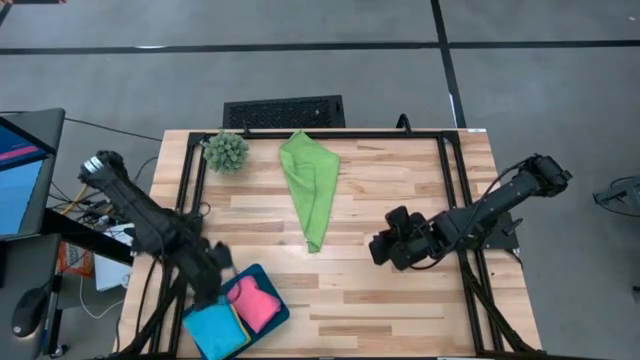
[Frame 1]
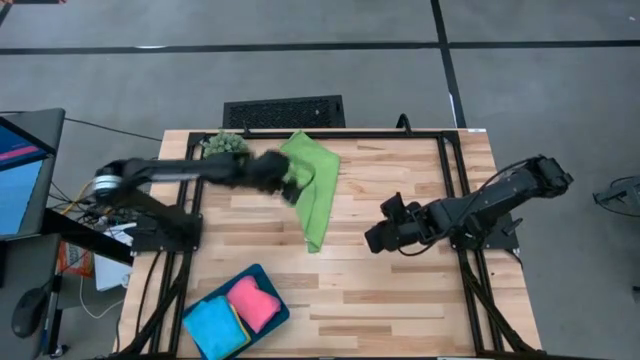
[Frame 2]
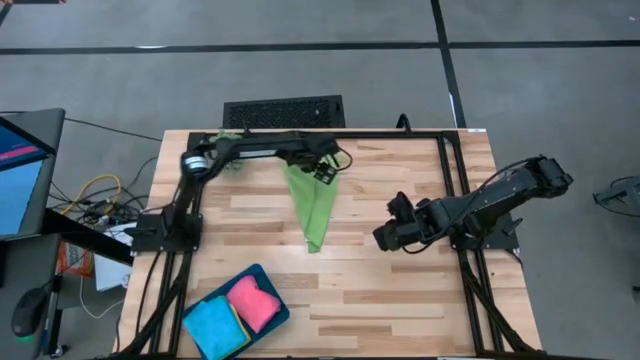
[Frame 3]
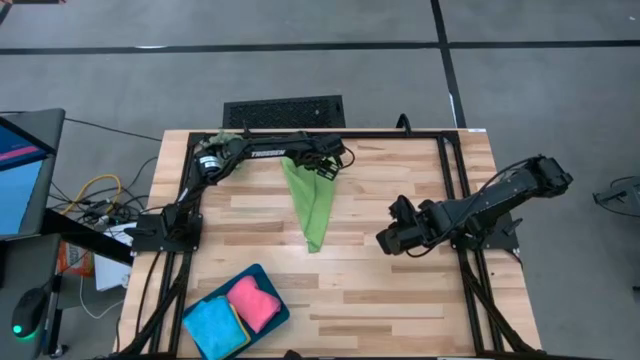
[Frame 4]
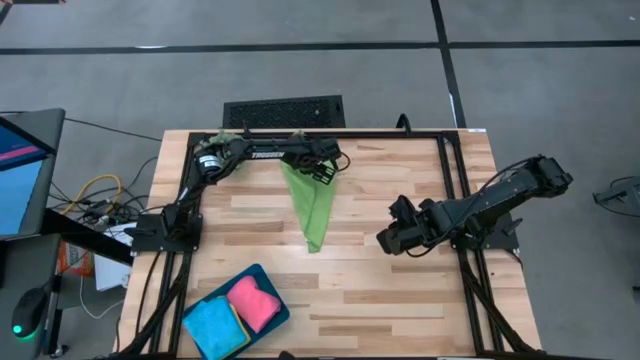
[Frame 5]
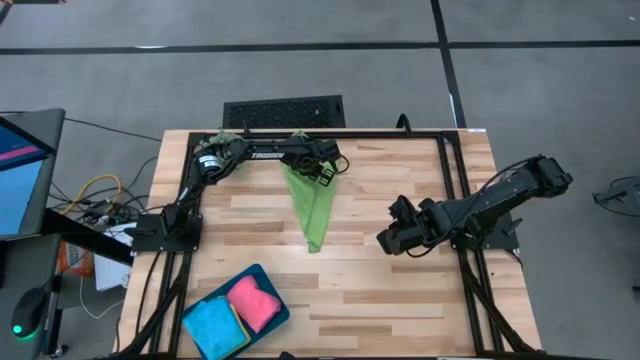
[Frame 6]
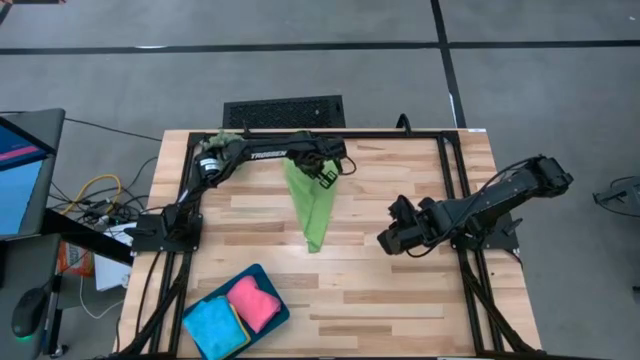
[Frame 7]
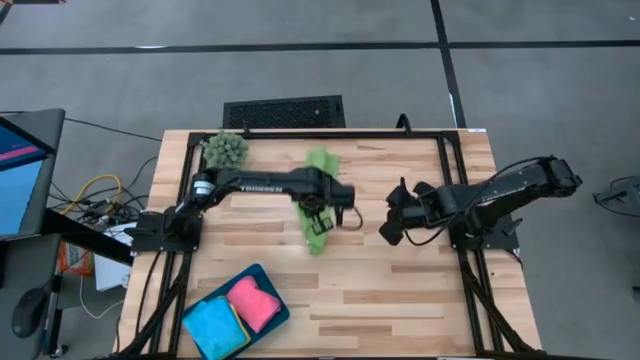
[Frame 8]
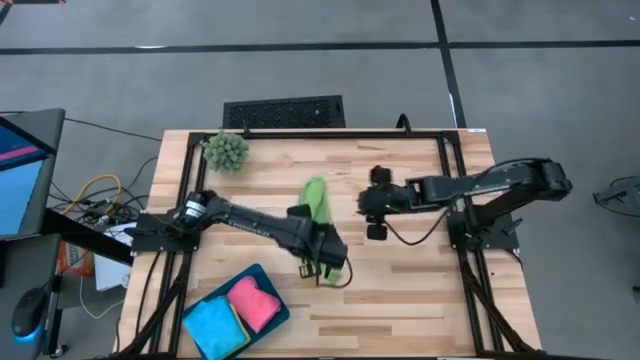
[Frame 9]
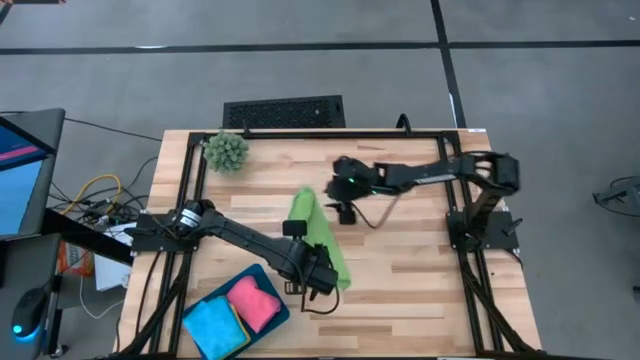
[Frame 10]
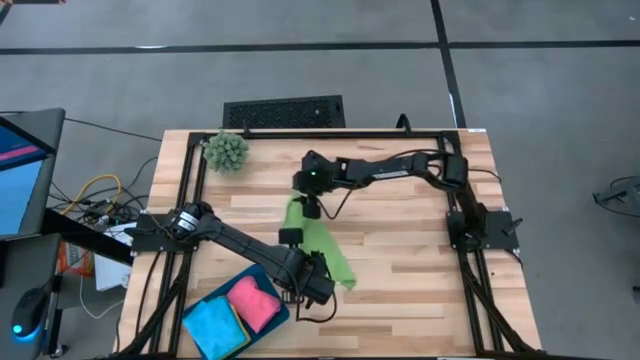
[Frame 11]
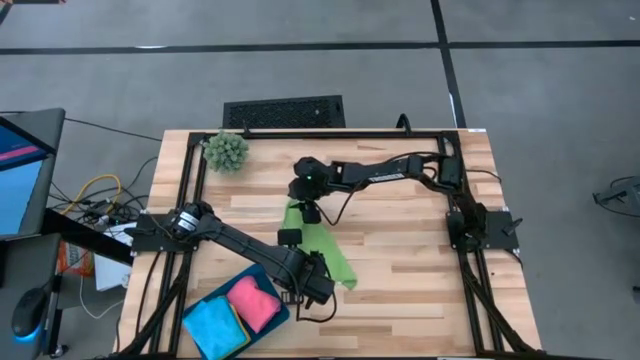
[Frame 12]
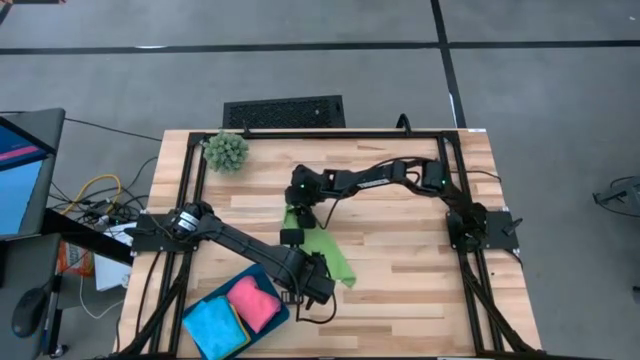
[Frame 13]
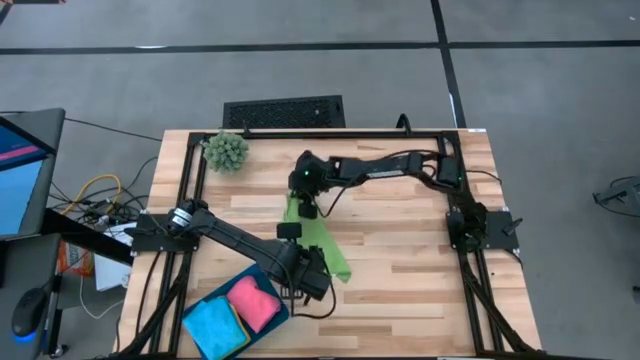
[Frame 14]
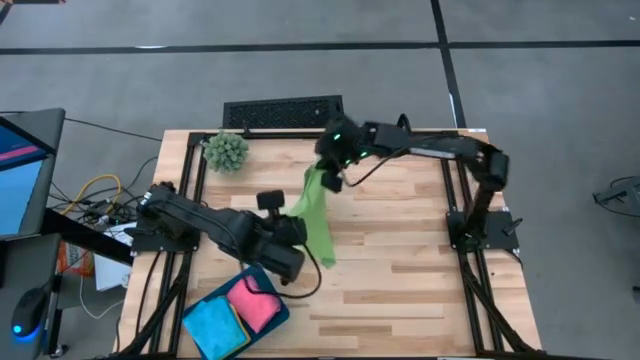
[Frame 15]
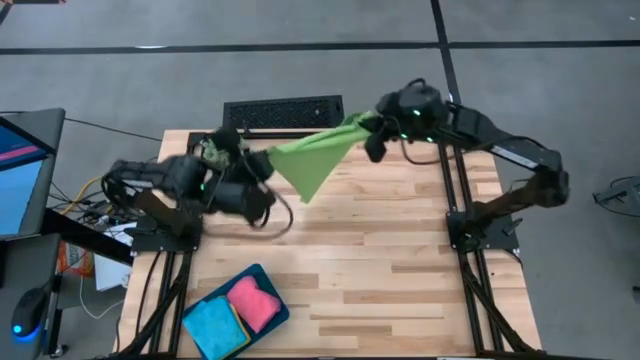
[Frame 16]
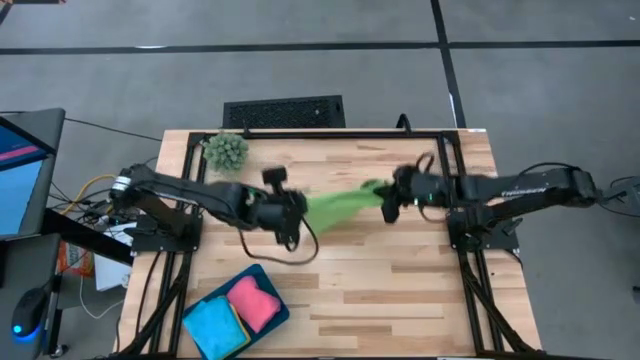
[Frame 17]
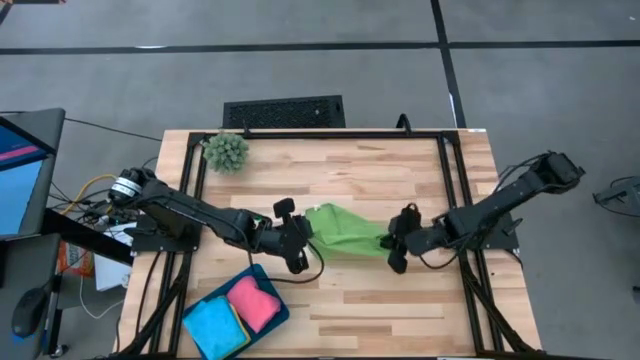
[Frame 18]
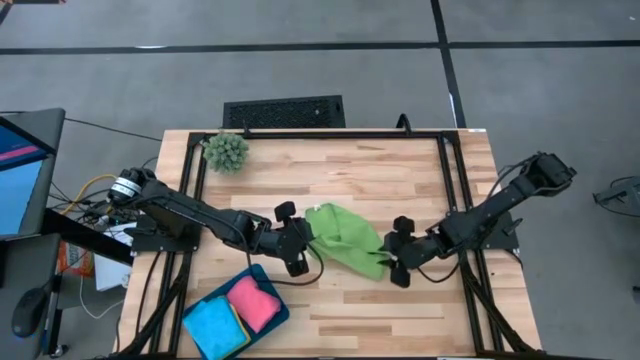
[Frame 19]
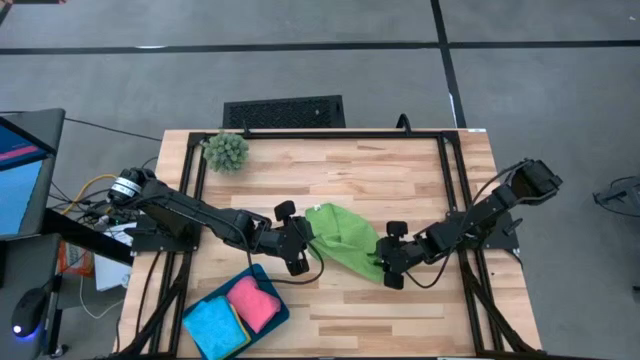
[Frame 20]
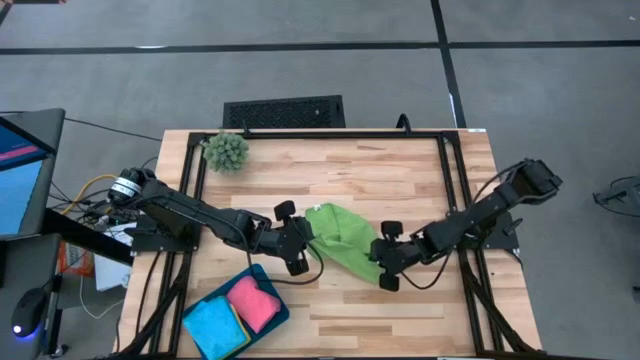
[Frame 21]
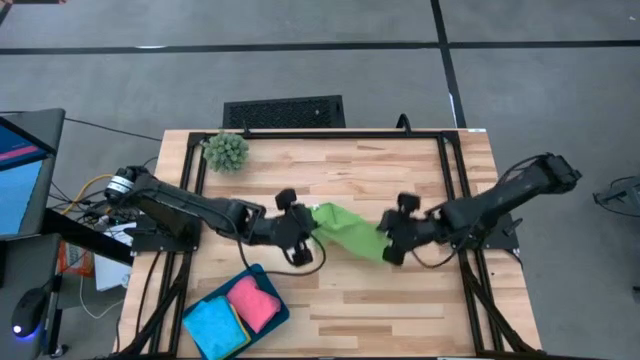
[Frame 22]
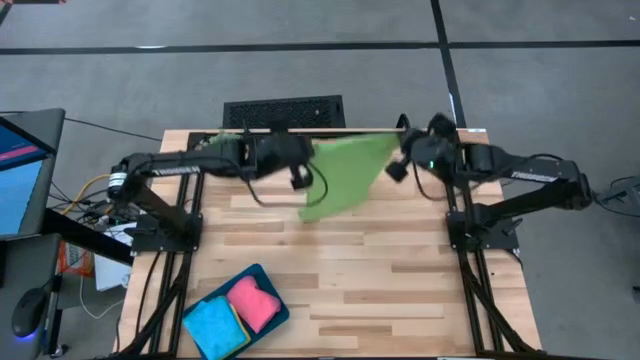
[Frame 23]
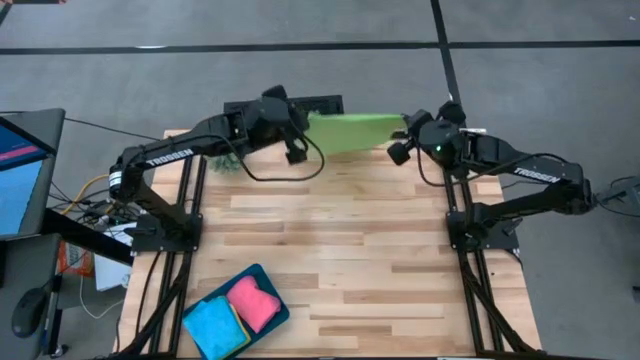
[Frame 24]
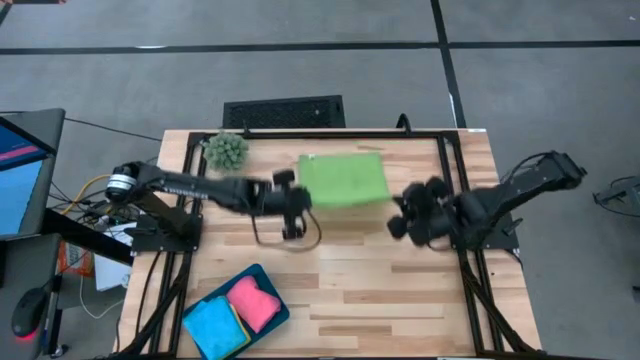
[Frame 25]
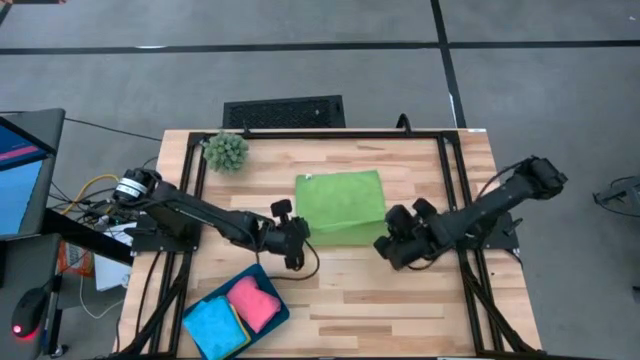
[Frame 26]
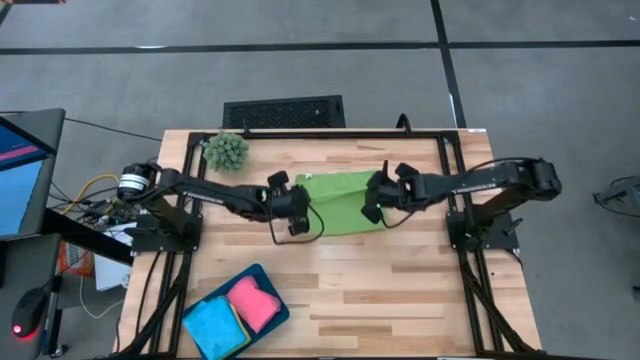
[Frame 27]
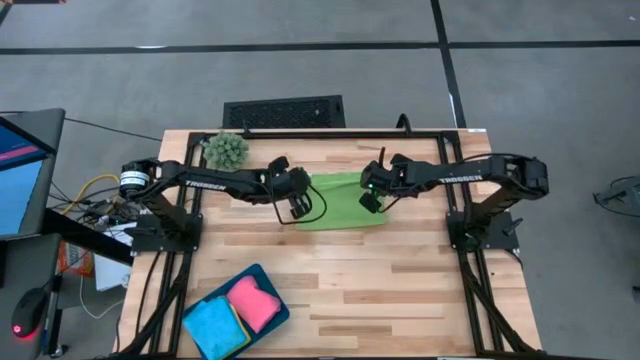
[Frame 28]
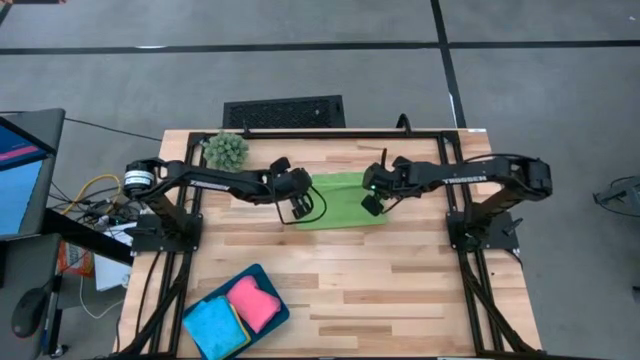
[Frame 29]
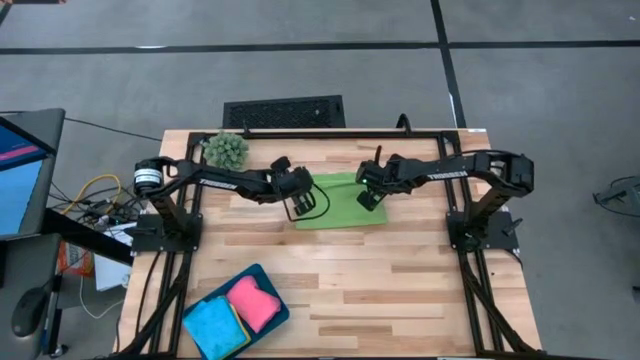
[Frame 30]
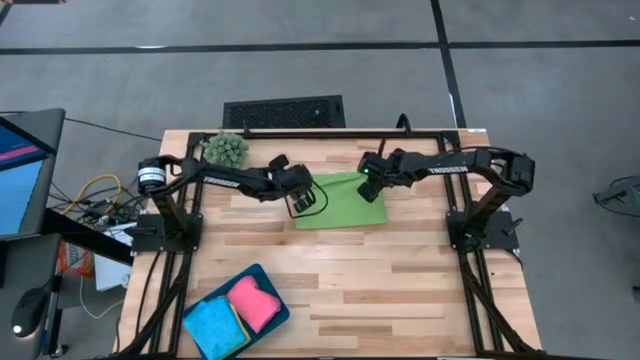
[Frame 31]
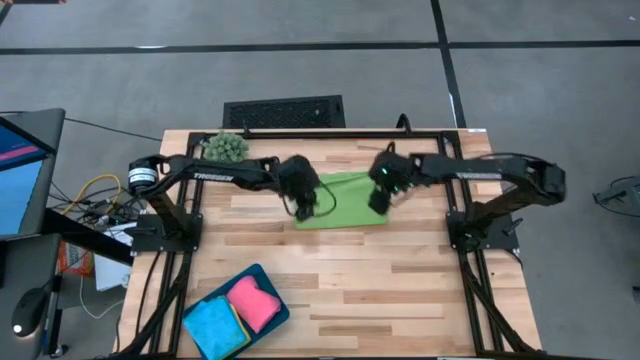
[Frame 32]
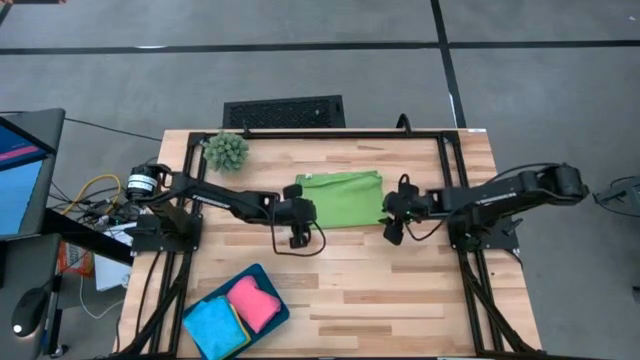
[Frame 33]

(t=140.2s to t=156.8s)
Task: Fold microfiber towels
Fold the green microfiber towel

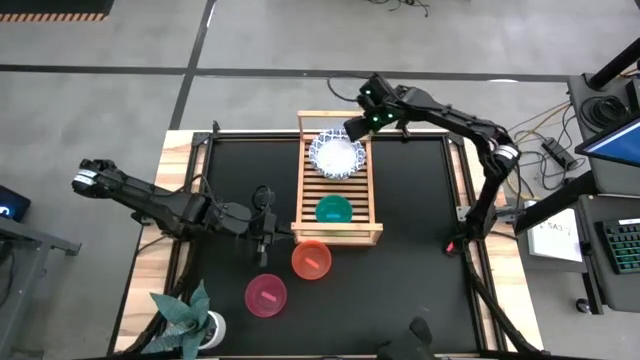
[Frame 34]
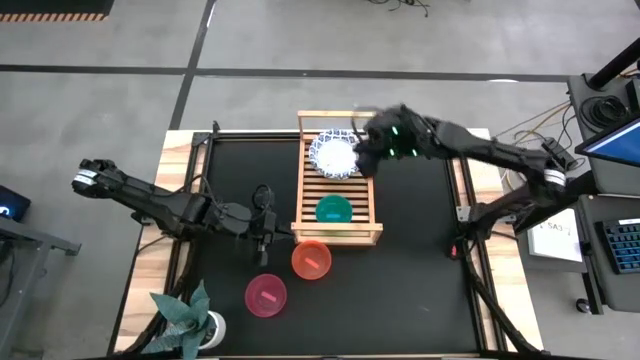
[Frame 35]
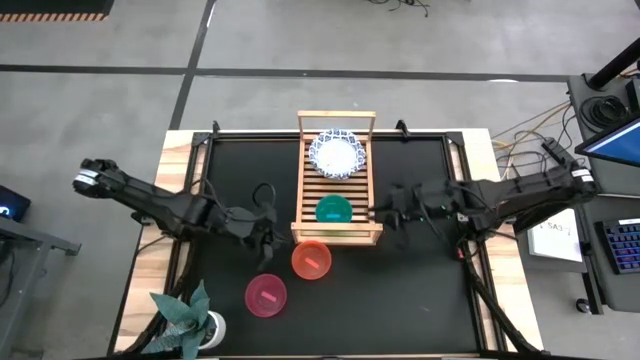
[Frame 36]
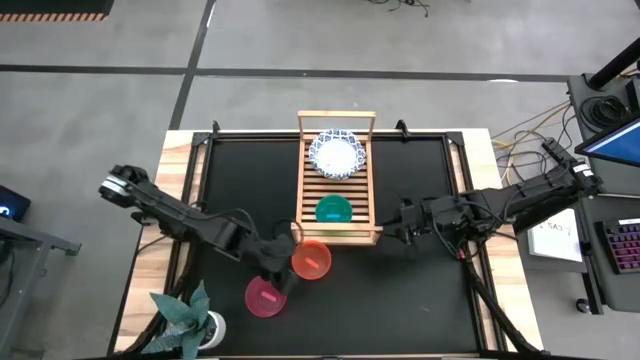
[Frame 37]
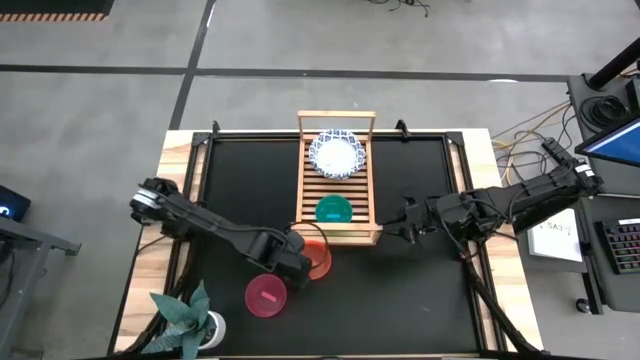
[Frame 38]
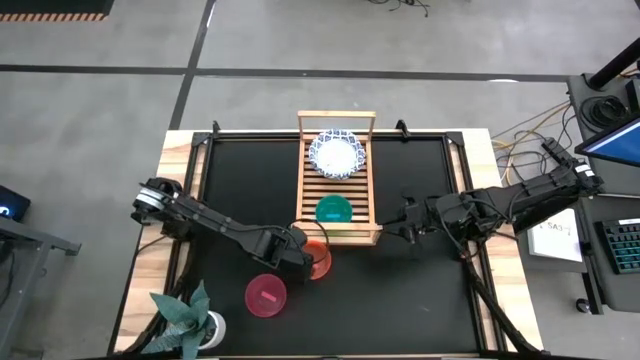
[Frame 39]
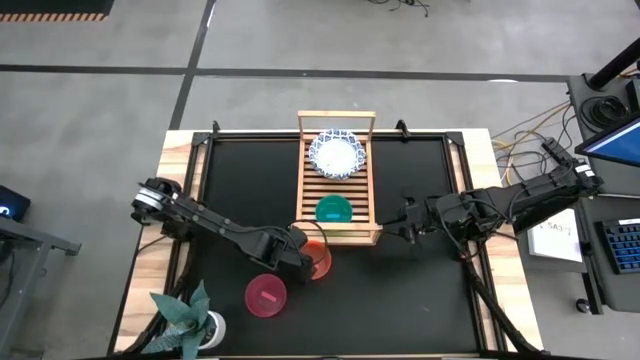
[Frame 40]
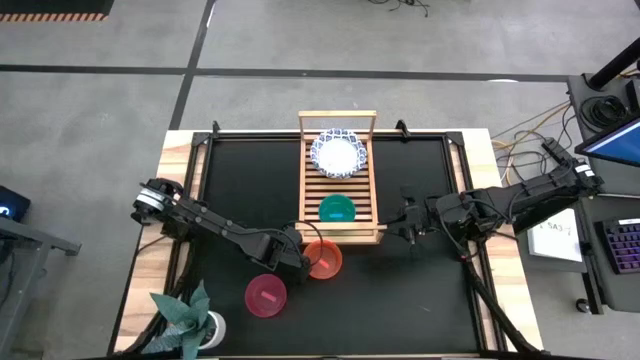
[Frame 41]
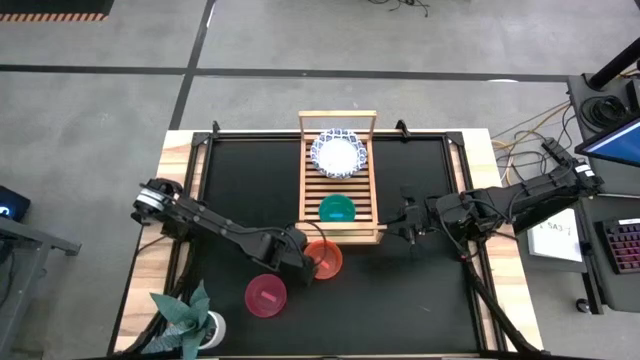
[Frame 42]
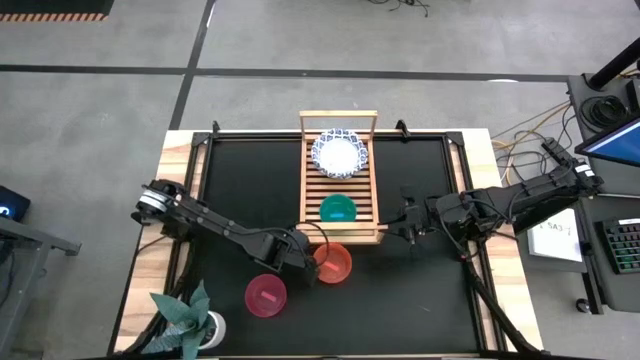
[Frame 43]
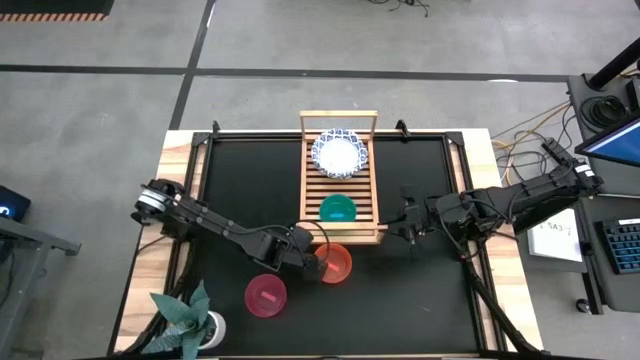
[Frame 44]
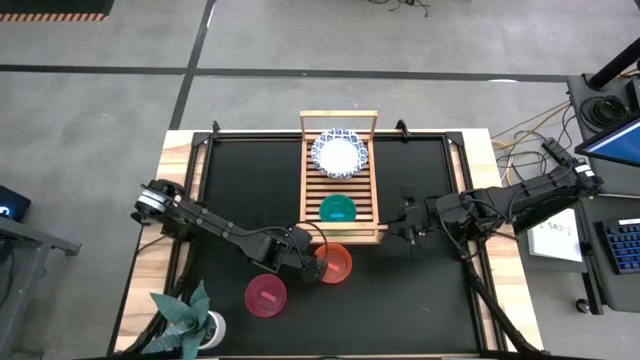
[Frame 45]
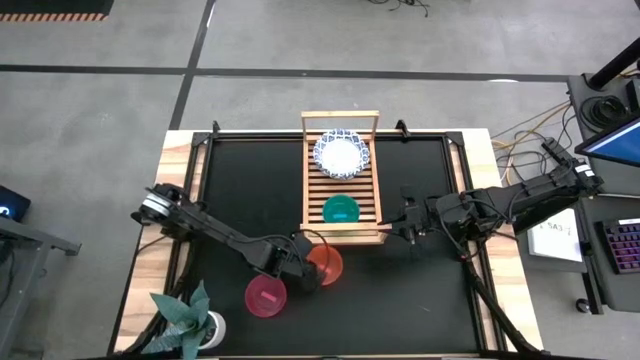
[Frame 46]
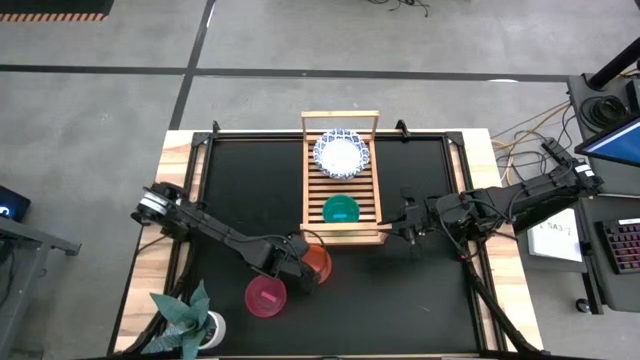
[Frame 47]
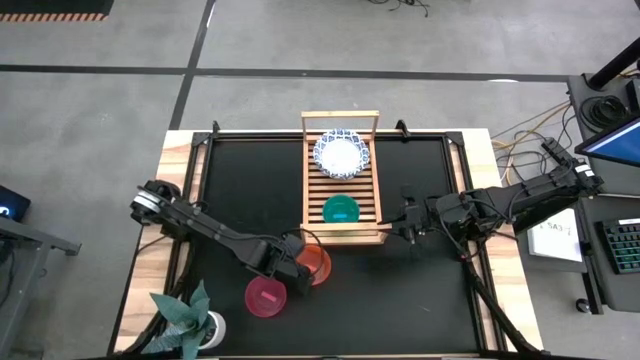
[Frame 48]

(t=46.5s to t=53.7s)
Task: Place and stack bowls onto a shelf
Stack the orange bowl on top of the blue bowl on the shelf
